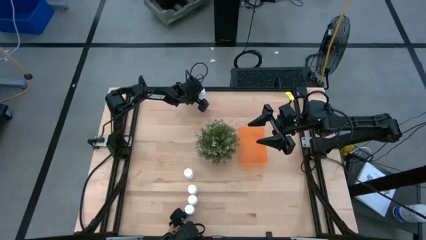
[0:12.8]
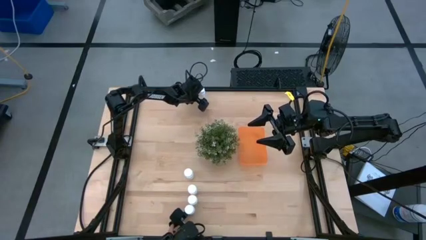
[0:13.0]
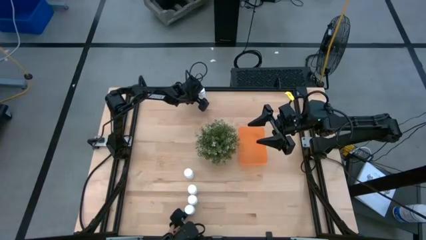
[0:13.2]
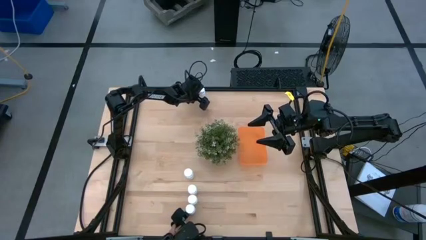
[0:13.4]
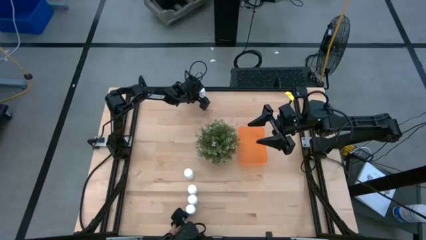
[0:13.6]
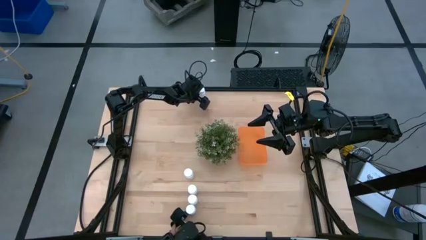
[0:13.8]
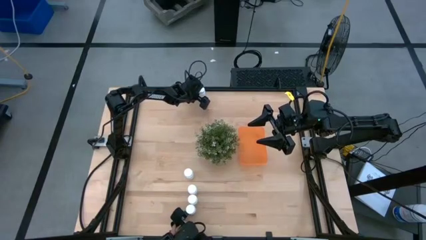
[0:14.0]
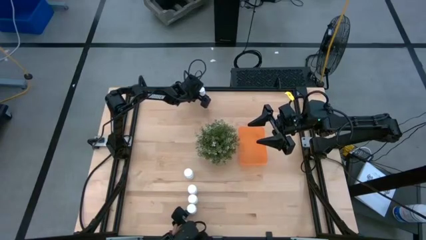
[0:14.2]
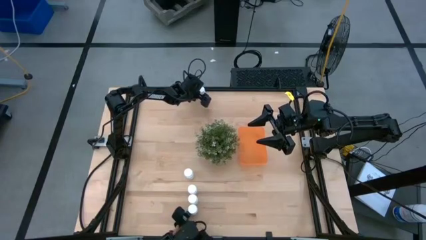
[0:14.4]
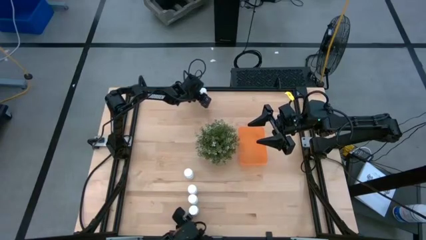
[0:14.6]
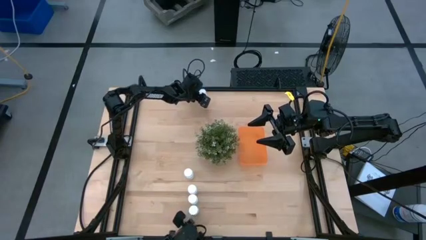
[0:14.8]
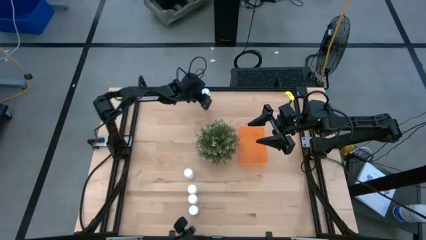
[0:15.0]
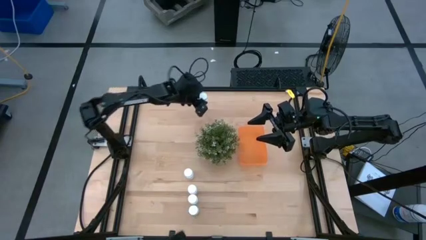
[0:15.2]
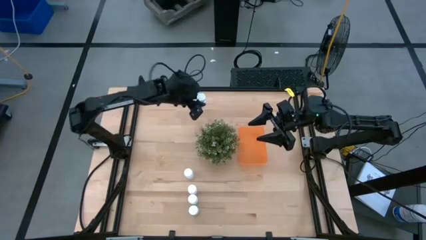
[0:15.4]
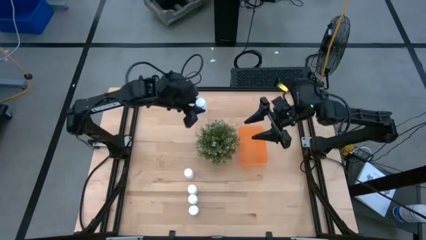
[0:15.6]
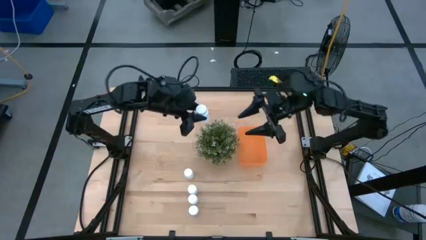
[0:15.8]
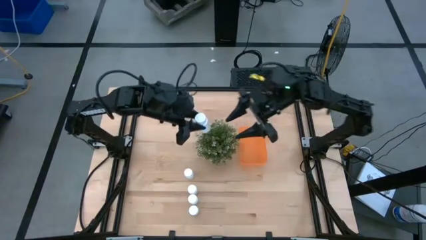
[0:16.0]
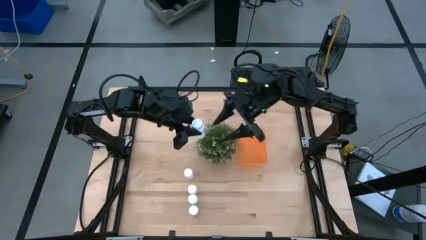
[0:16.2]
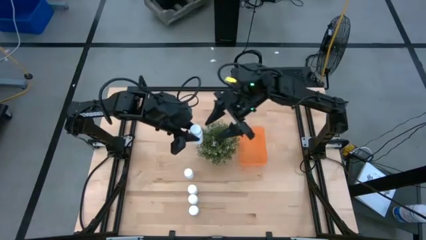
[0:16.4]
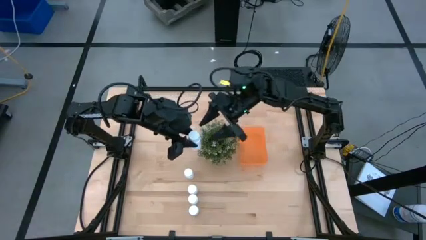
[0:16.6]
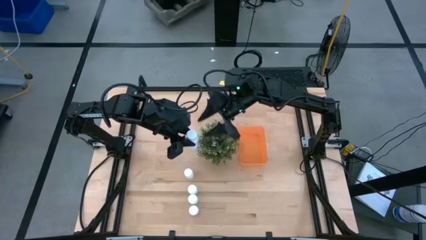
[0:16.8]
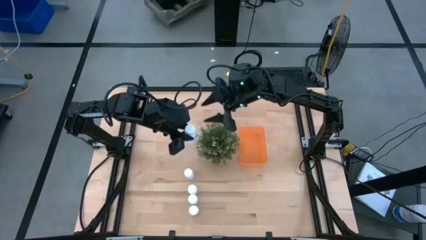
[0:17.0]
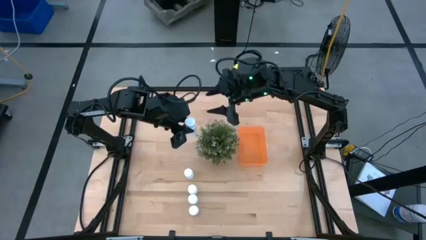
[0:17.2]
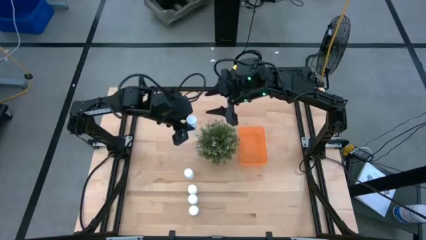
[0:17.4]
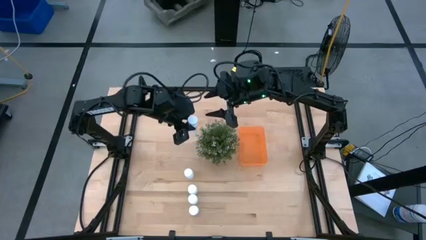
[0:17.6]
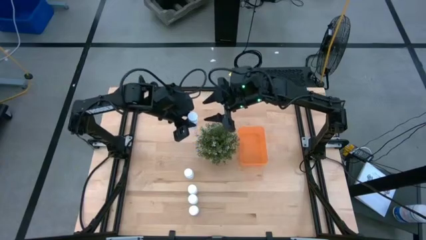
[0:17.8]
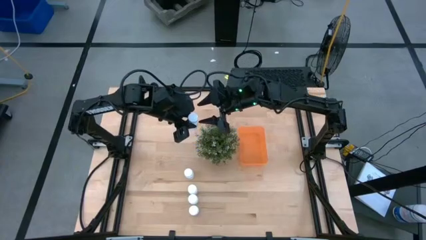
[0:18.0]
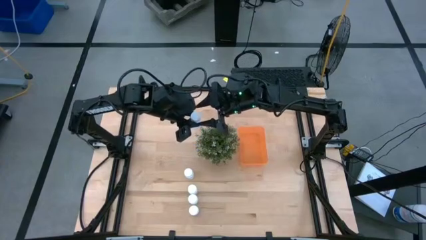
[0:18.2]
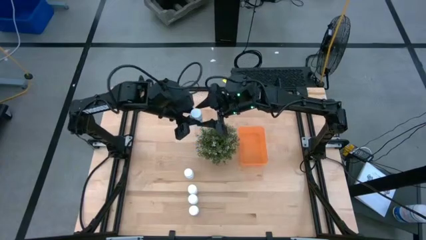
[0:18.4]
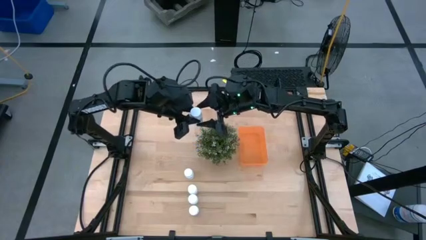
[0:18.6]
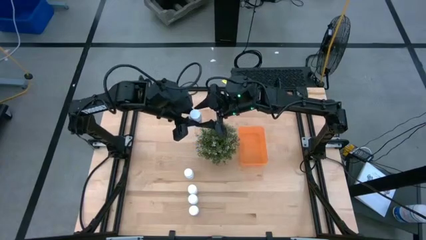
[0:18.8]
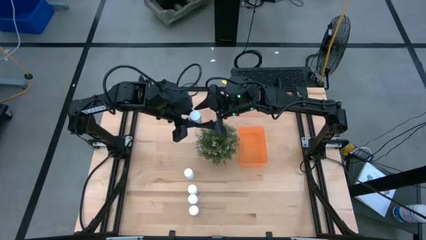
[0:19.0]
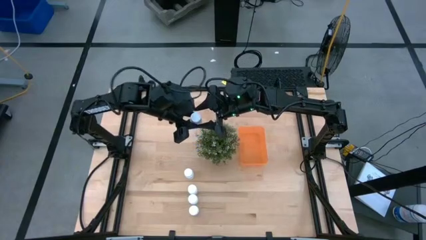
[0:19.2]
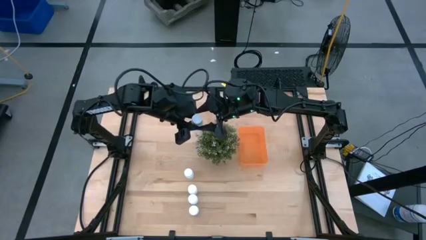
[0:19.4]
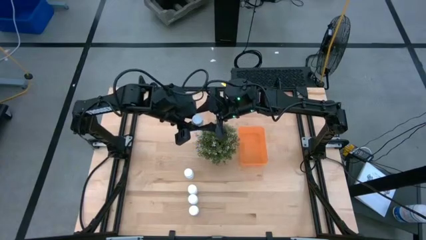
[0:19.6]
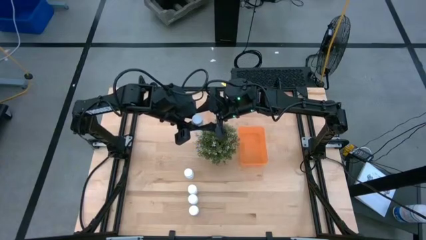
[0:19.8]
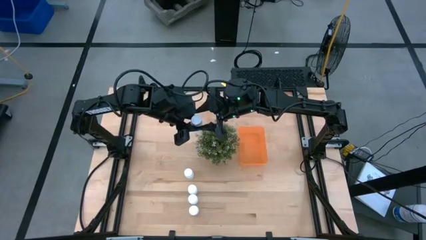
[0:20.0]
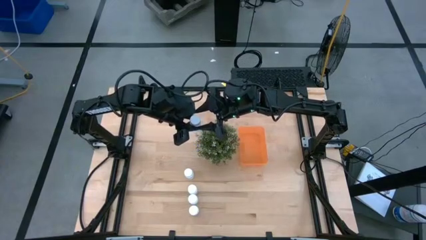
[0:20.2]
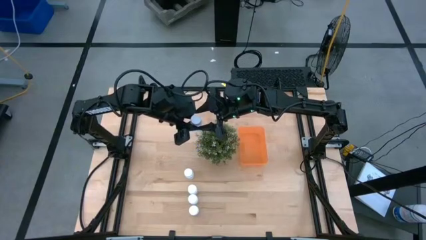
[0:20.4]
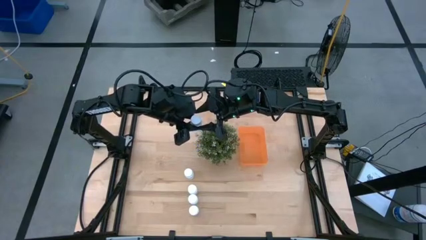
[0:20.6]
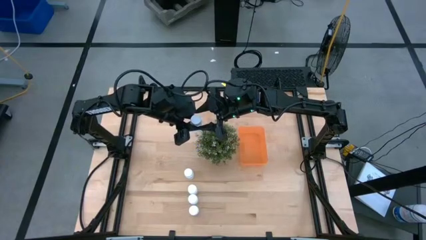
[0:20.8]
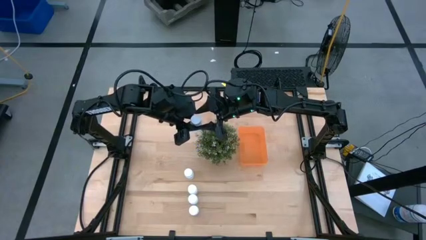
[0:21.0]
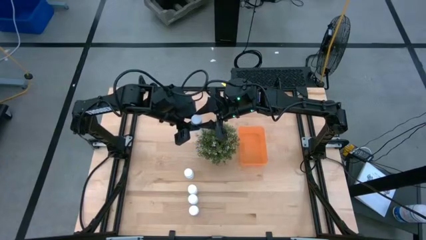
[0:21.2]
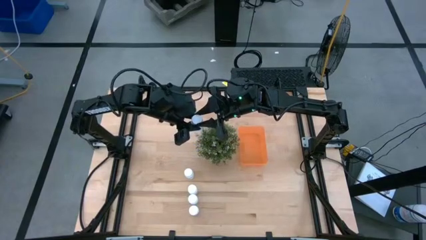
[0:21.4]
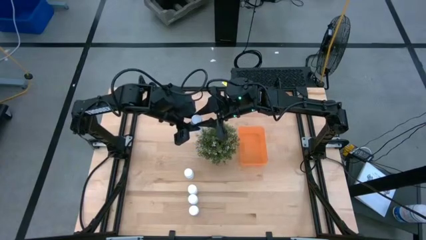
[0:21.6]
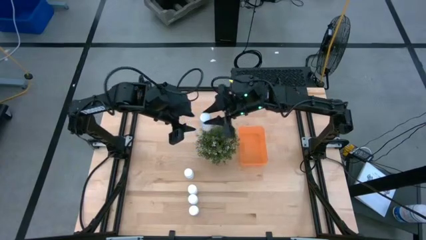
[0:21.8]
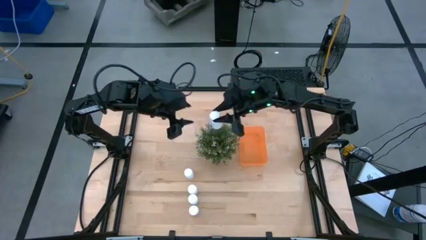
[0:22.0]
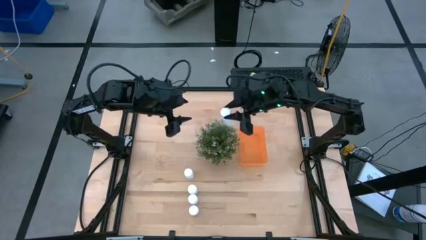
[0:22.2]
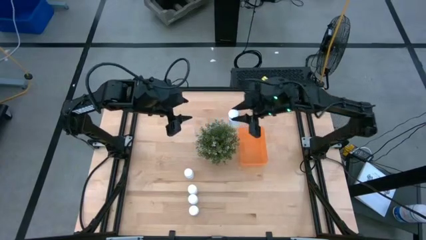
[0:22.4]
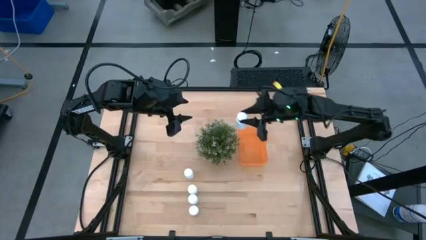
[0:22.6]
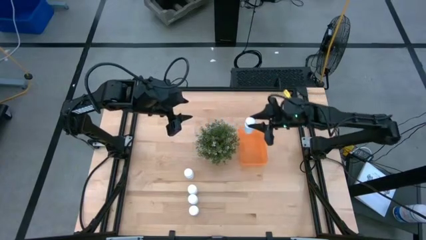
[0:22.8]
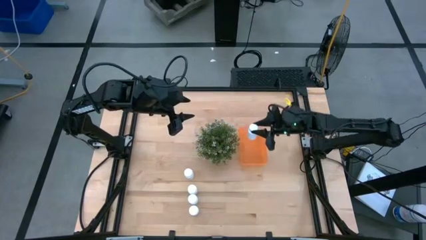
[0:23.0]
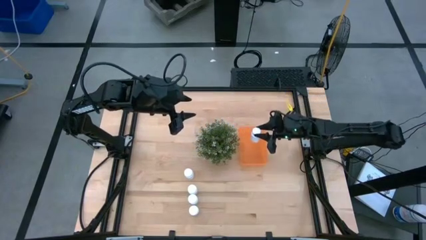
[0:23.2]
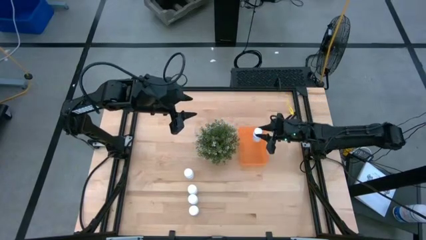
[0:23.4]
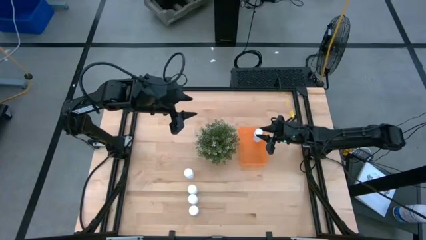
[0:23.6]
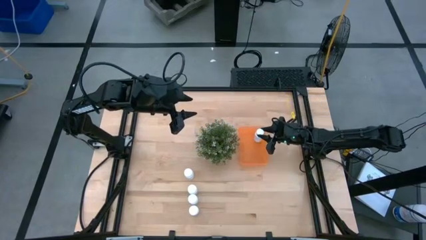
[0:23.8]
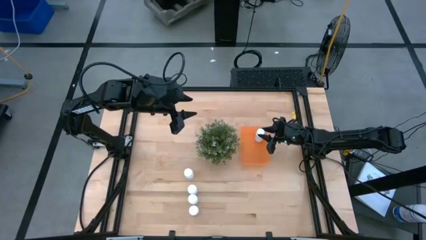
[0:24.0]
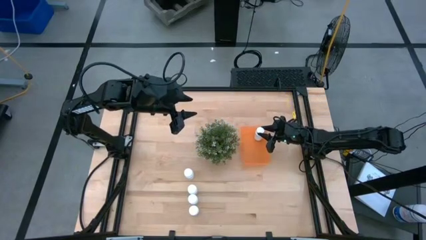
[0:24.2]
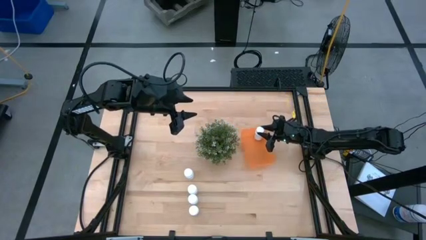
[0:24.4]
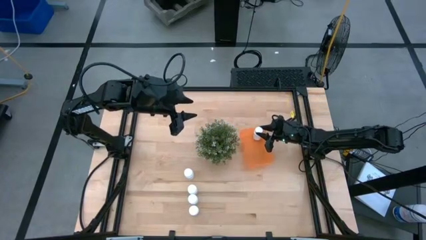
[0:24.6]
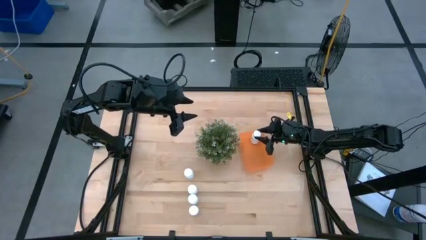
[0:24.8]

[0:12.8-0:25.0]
Task: Pick and place pill bottles into a basket
Put the white medicine bottle into the orange bin

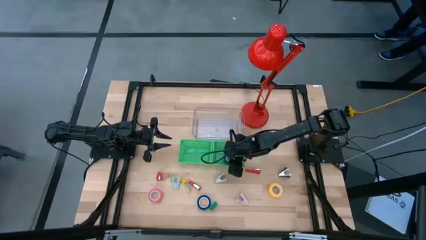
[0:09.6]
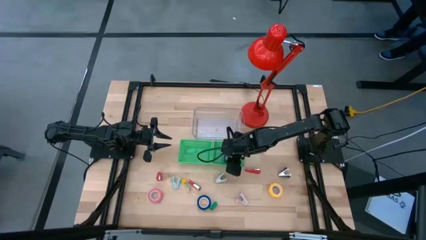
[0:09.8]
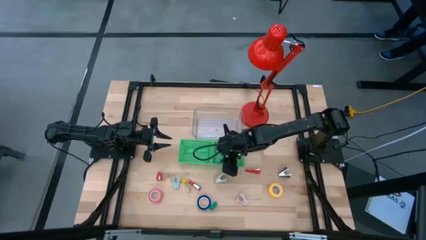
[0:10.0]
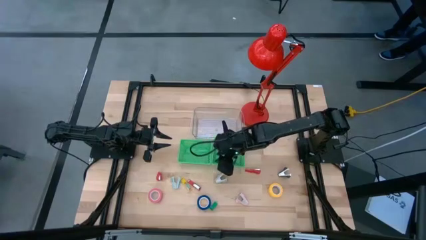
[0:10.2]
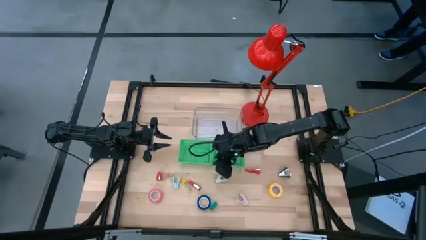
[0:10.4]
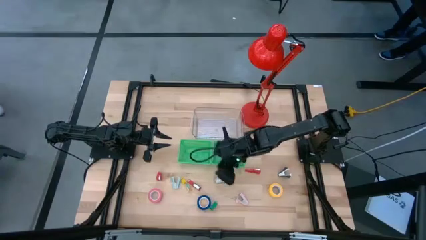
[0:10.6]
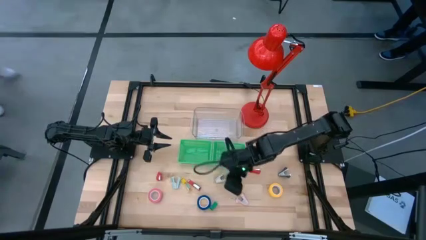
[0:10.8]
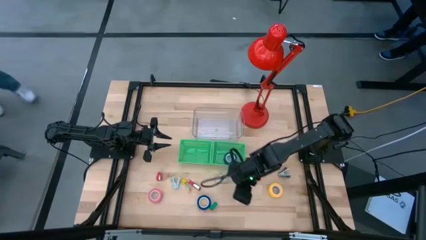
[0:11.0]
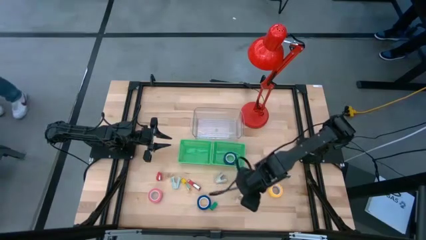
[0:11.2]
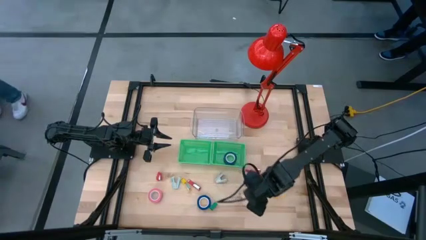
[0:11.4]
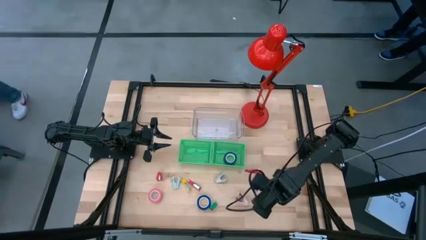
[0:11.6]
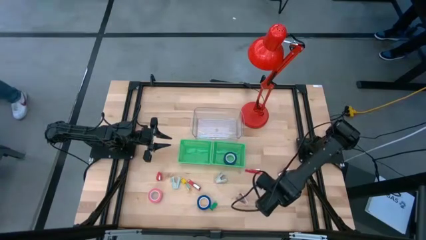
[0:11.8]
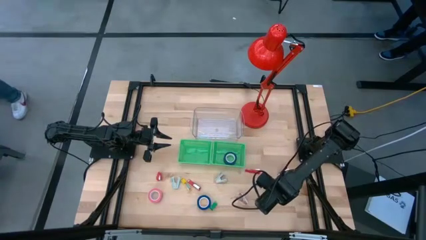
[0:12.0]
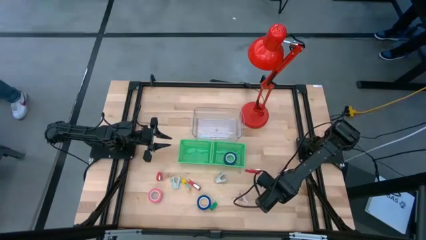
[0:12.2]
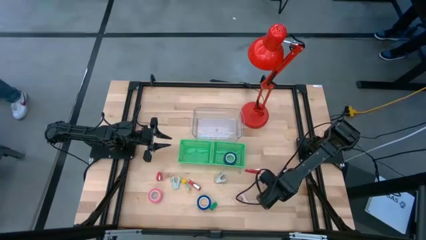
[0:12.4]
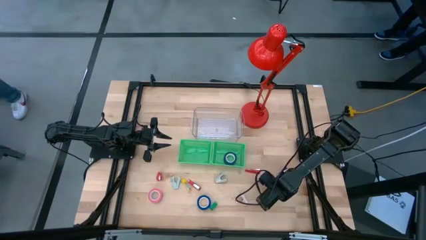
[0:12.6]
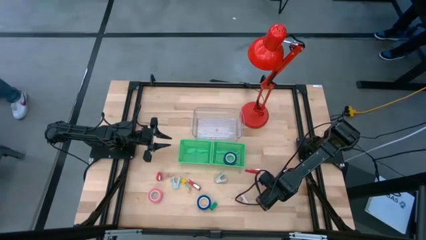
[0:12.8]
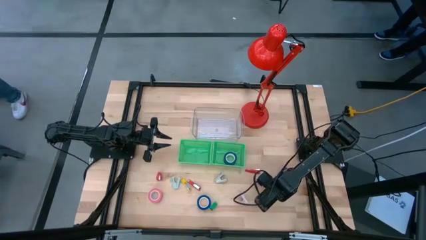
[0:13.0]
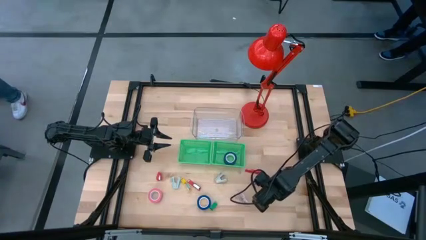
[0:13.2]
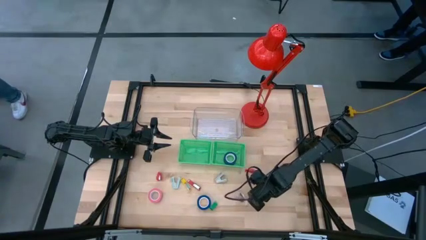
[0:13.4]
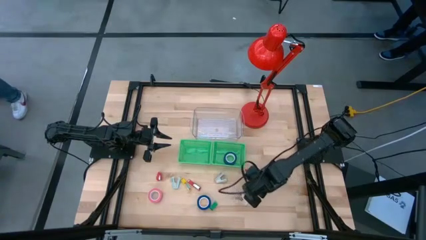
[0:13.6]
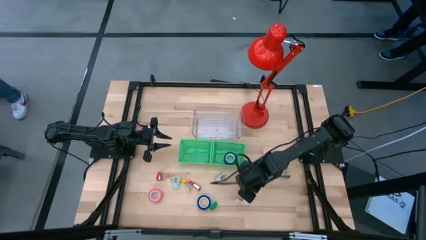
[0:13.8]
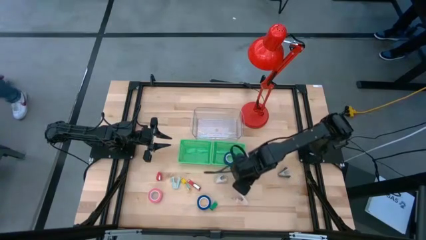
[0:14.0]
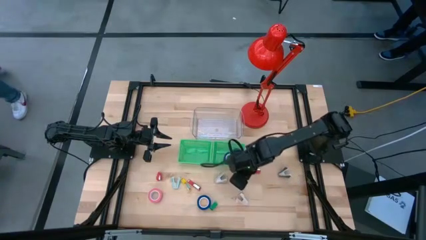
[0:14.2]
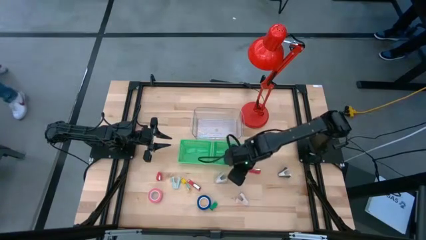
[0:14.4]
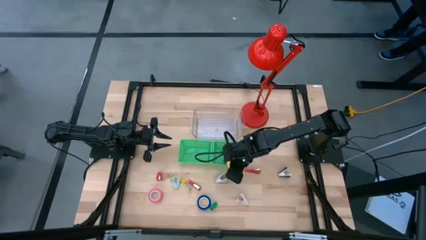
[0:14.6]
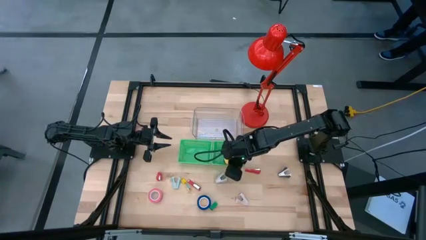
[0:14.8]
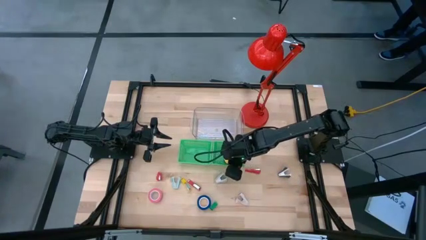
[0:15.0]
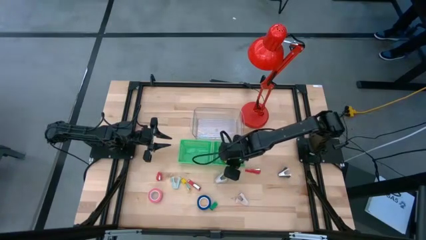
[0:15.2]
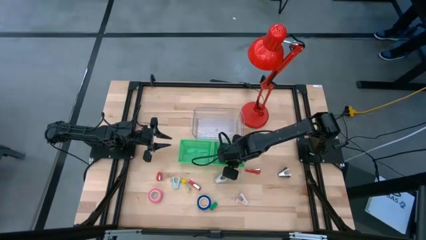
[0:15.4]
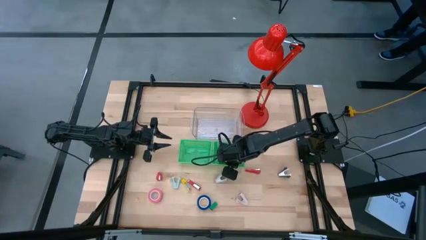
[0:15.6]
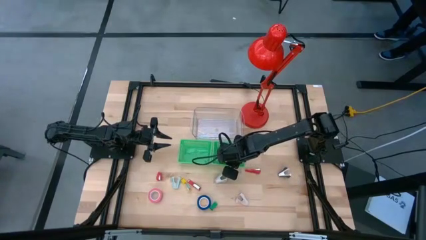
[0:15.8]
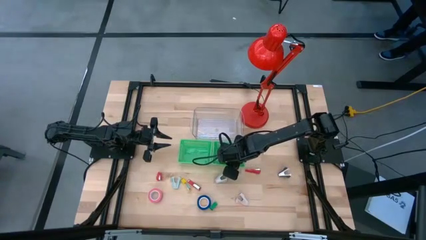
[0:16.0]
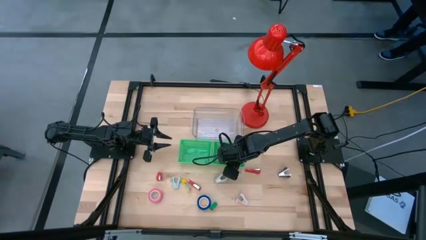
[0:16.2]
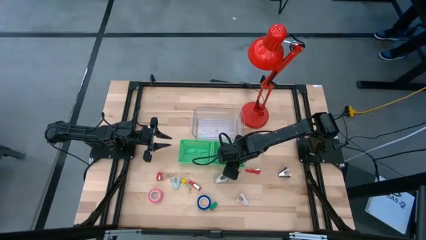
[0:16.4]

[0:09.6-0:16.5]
Task: Pick and place Stapler, Stapler remover, tape
Put the yellow tape into the right green bin
